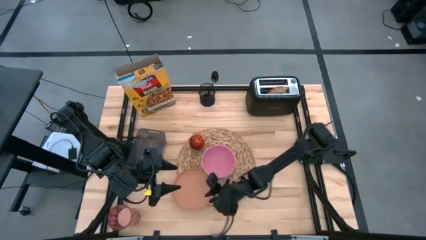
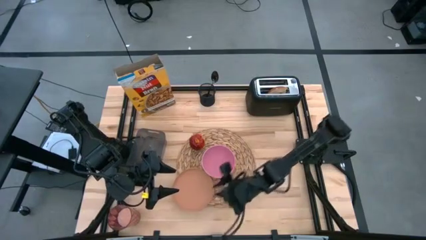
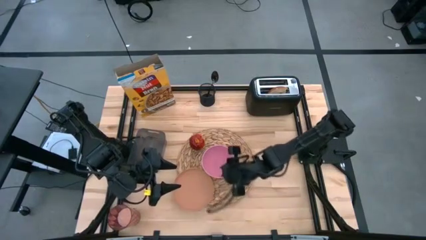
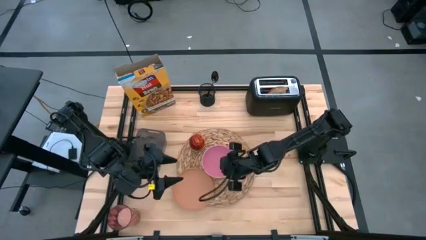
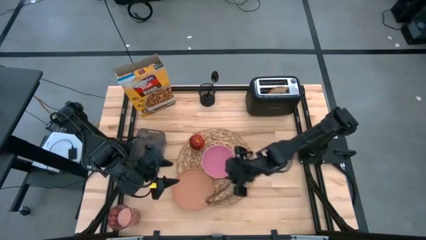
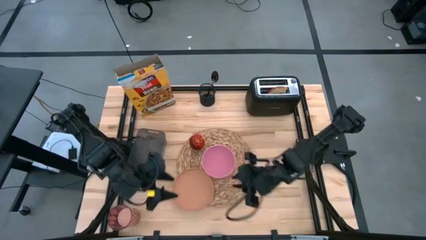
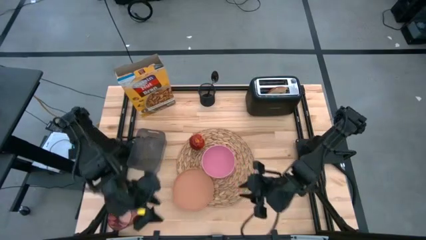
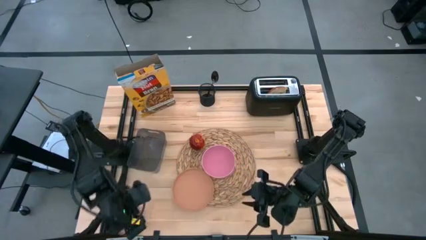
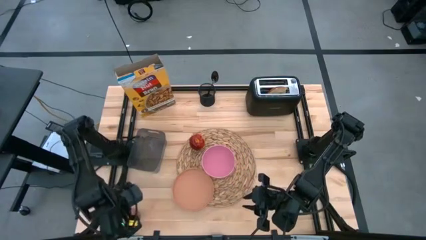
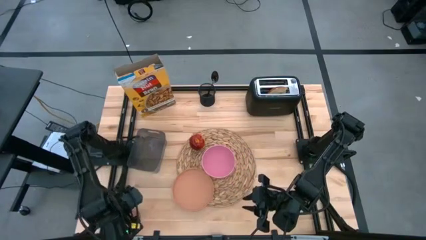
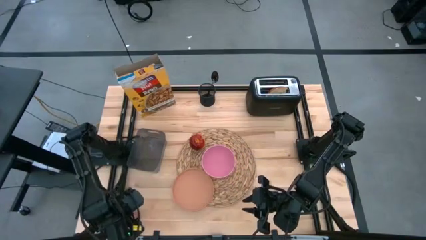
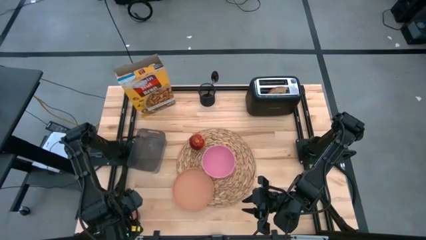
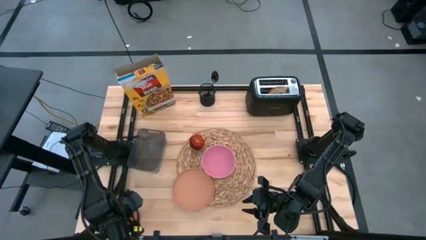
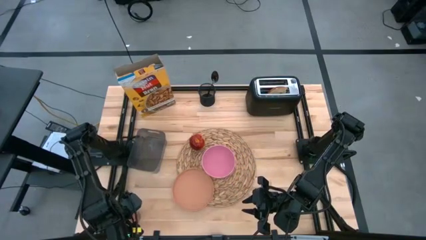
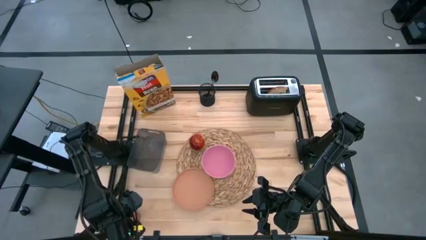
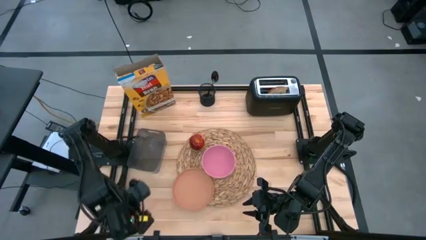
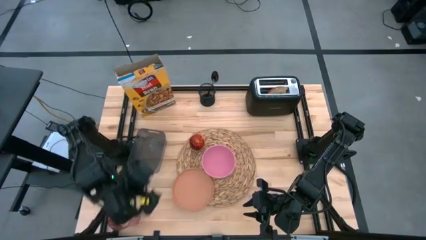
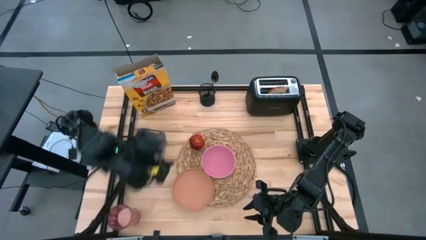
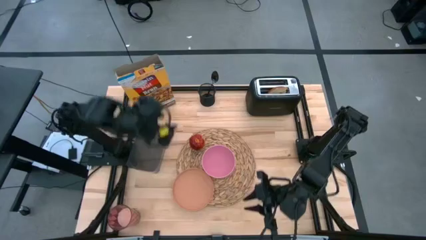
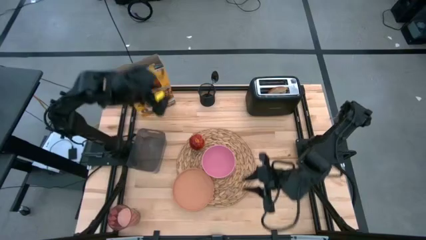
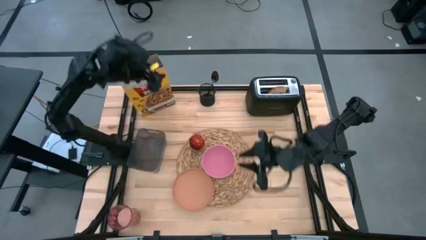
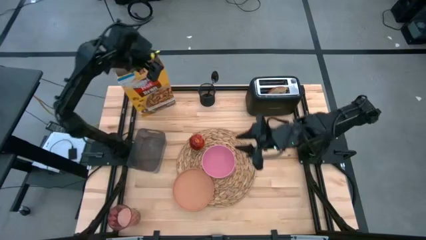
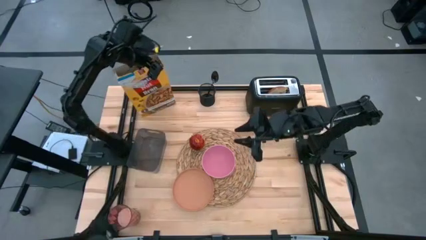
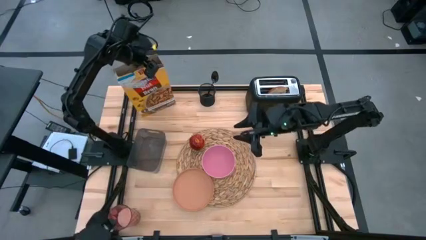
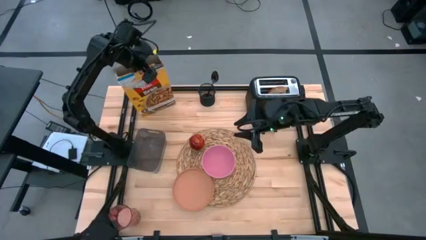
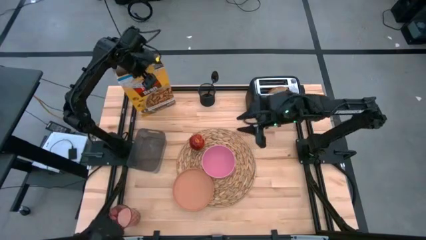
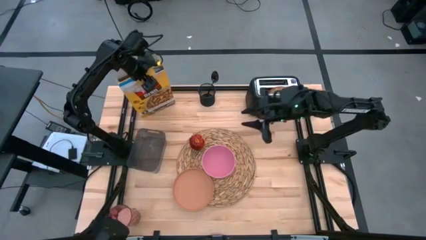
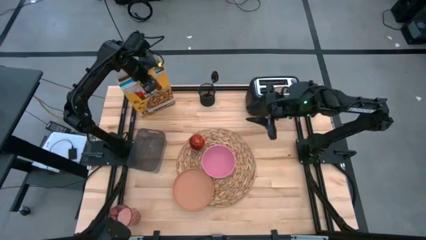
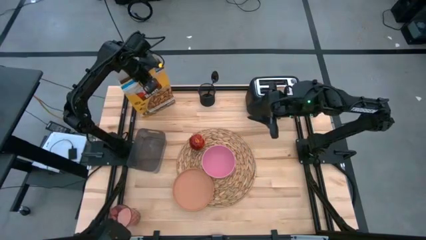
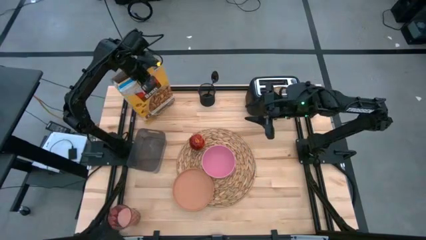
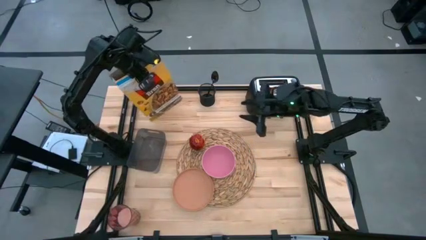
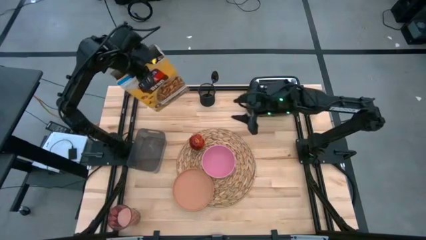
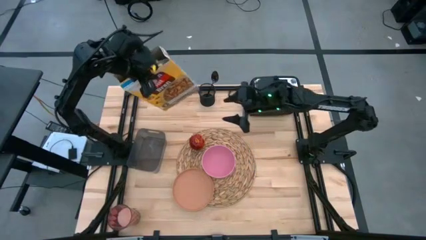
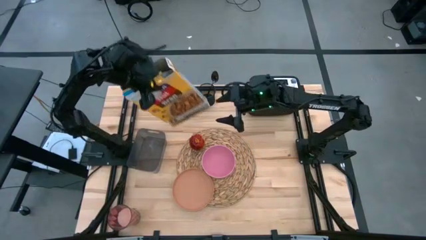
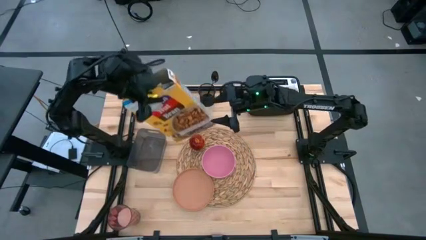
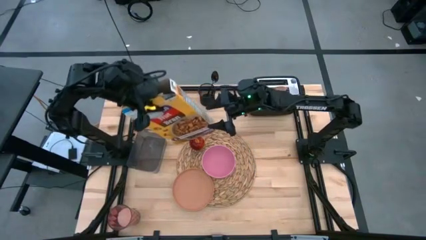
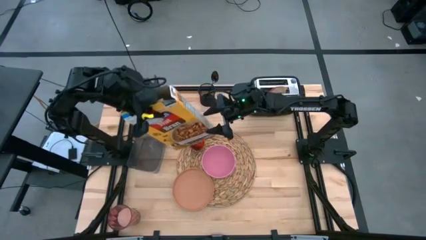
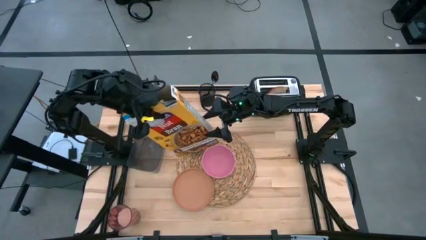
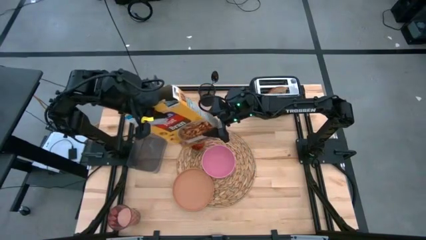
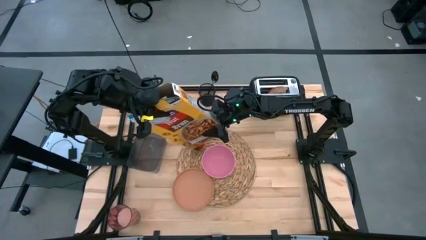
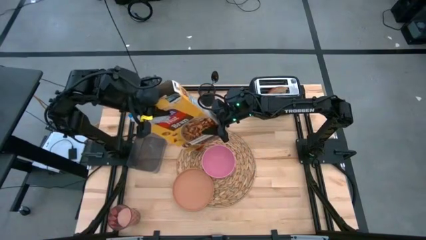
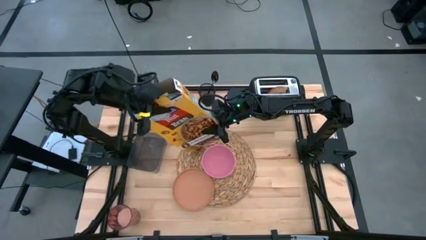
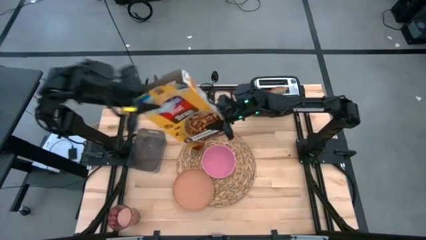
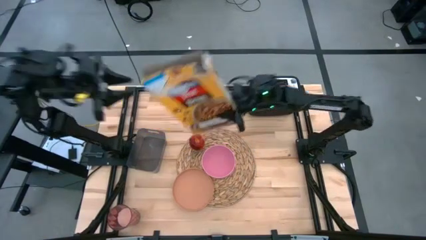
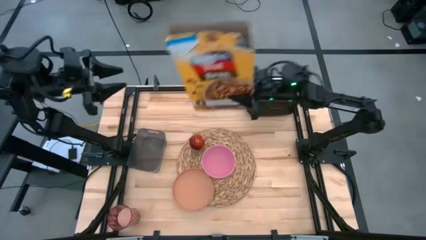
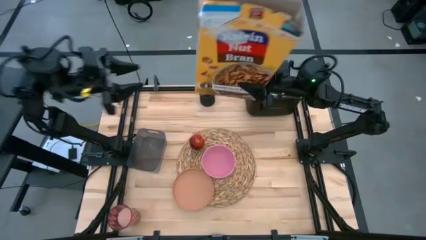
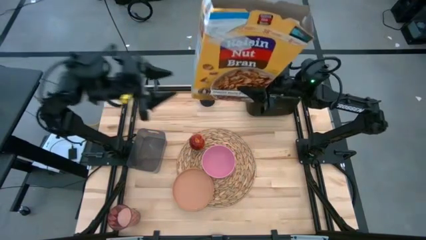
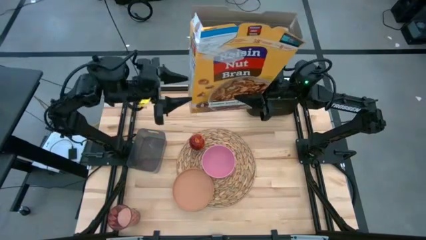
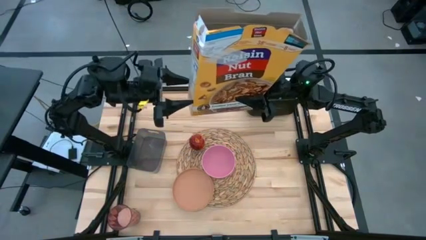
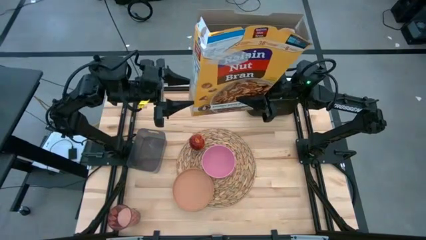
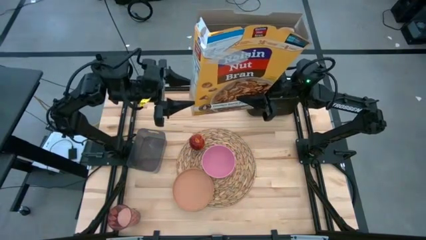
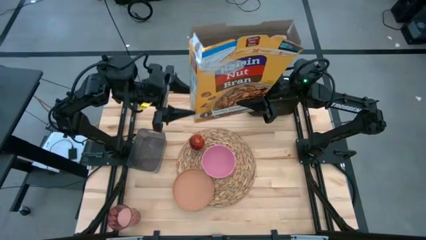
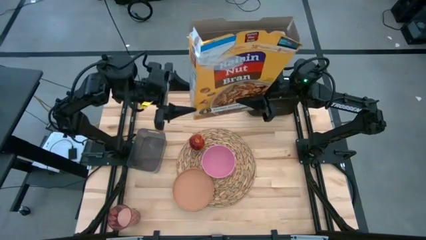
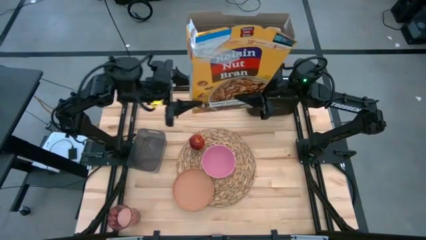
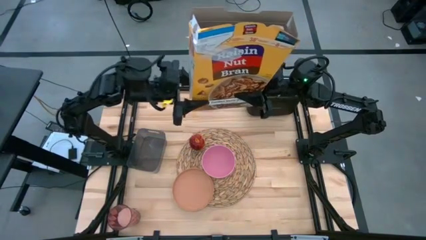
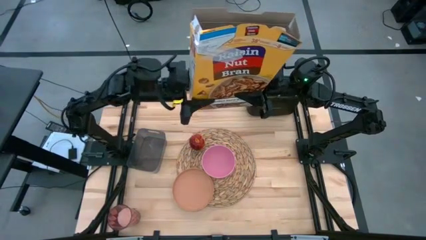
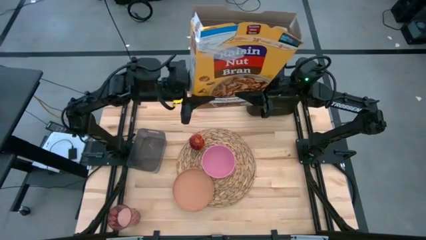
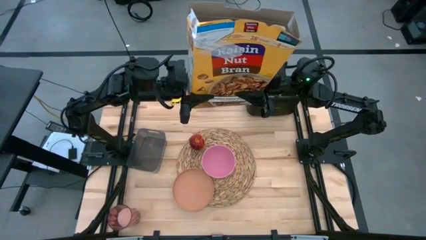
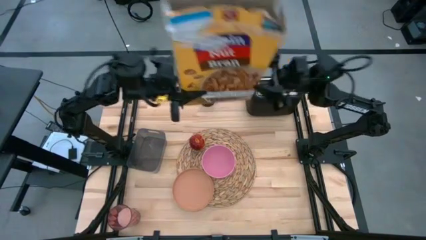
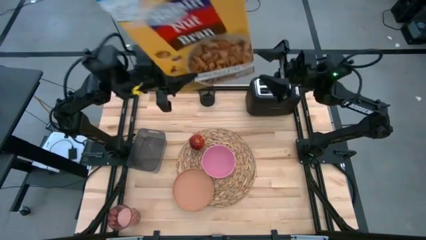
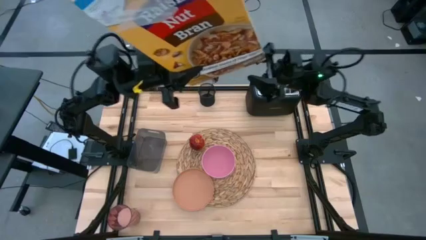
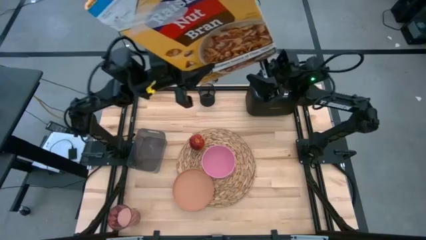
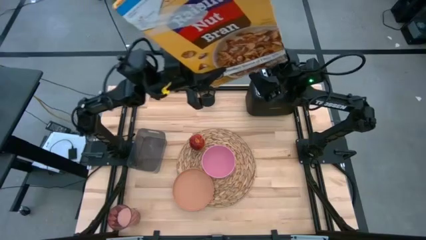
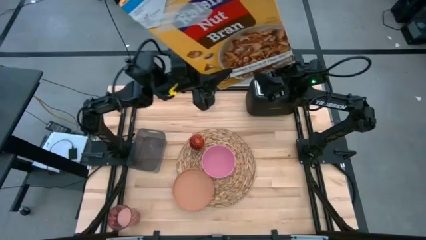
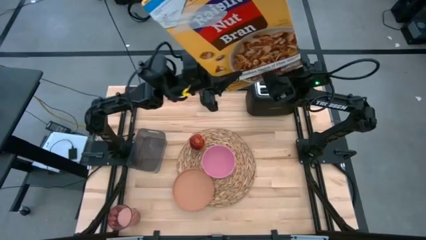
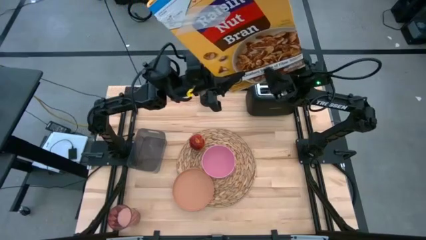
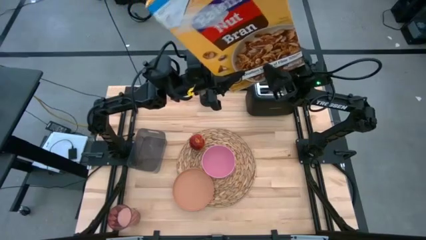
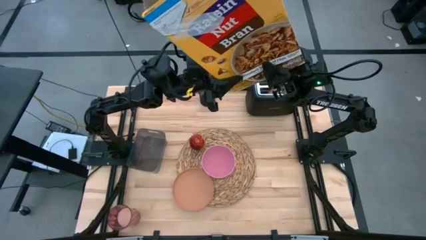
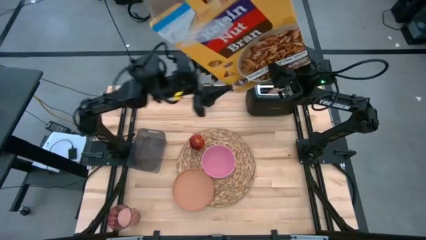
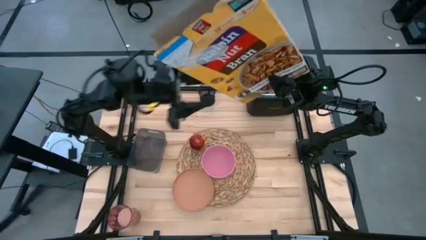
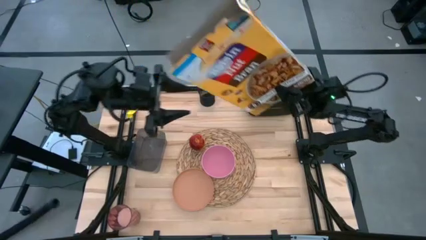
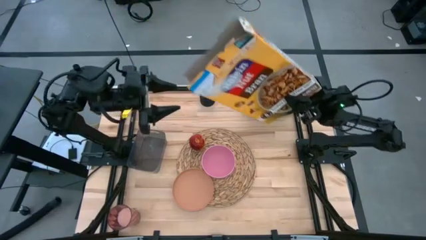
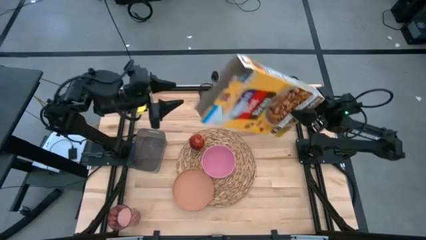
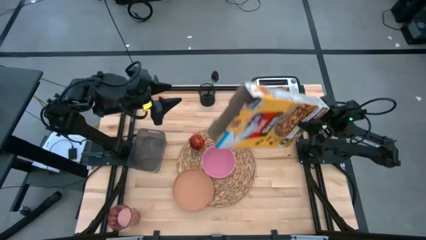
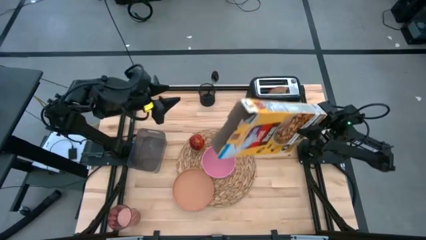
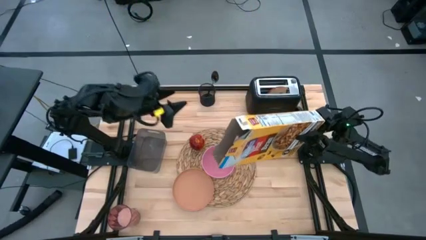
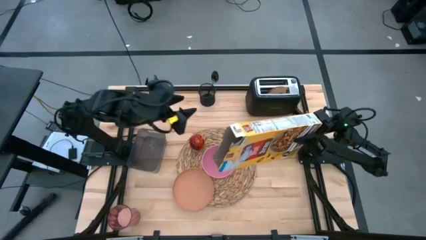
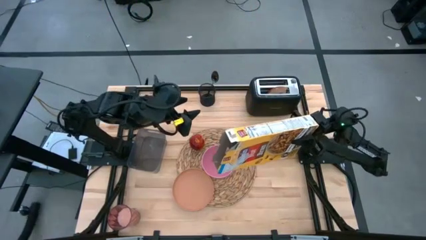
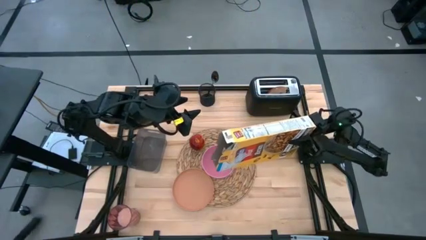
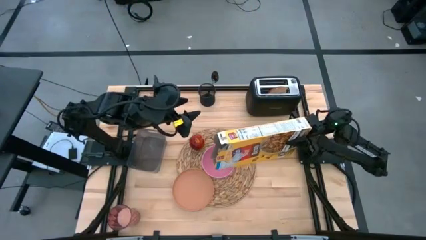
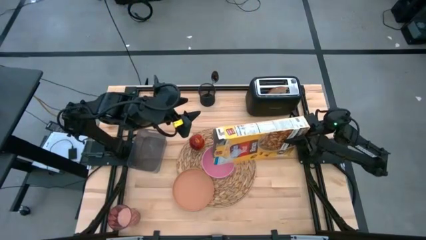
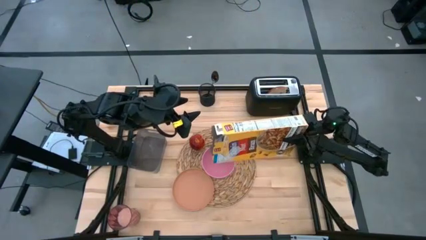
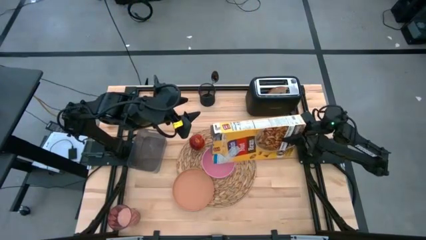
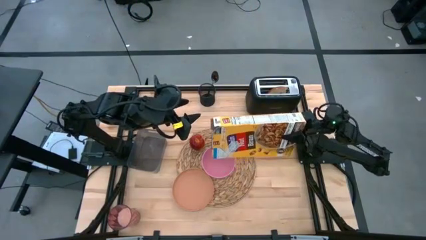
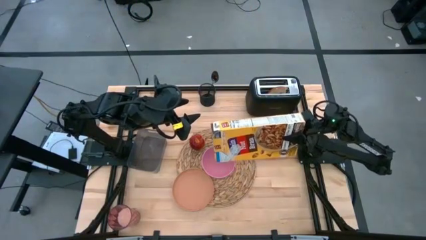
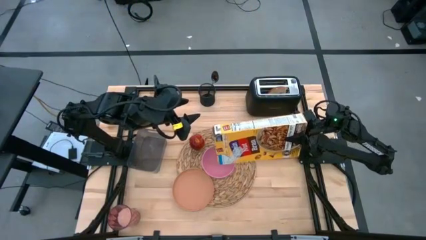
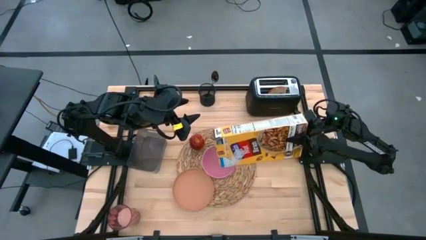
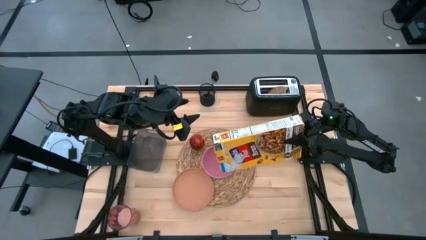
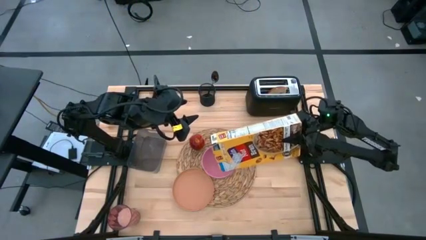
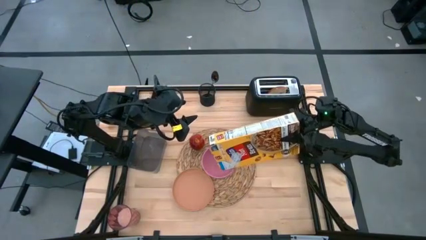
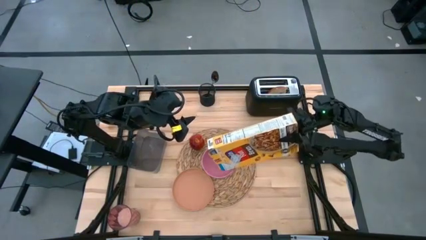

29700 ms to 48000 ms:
Task: Arrange a breakfast setting
Pour the cereal into the pink bowl
